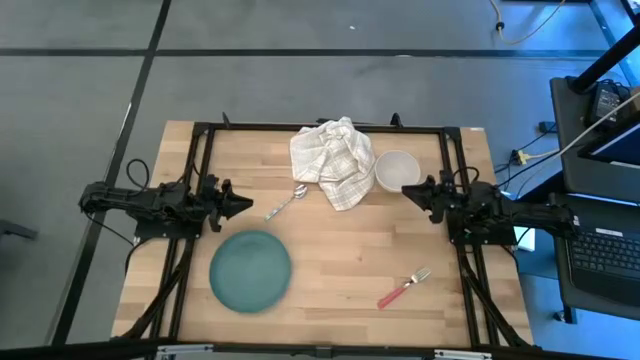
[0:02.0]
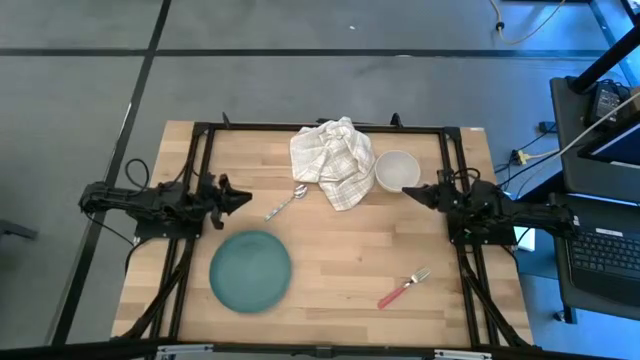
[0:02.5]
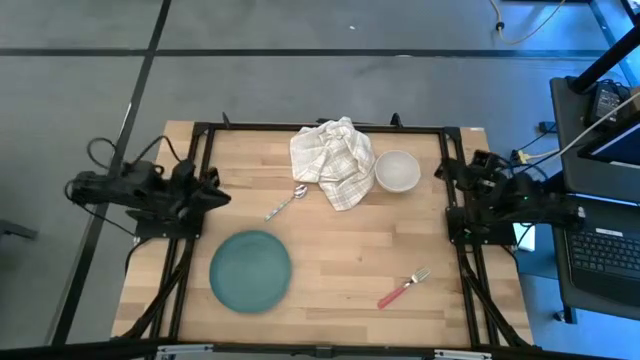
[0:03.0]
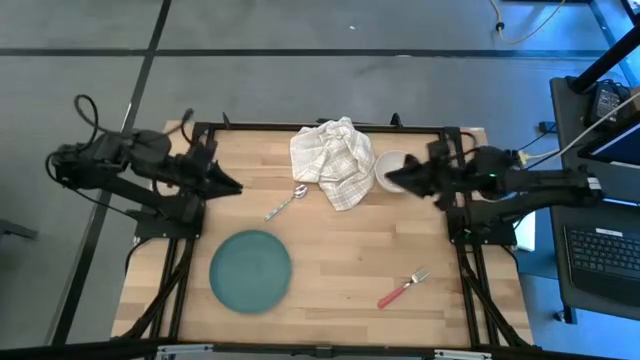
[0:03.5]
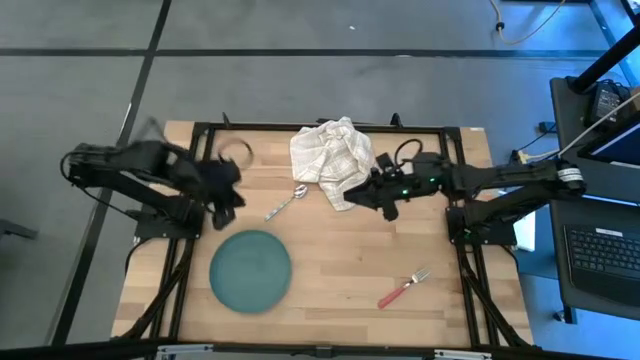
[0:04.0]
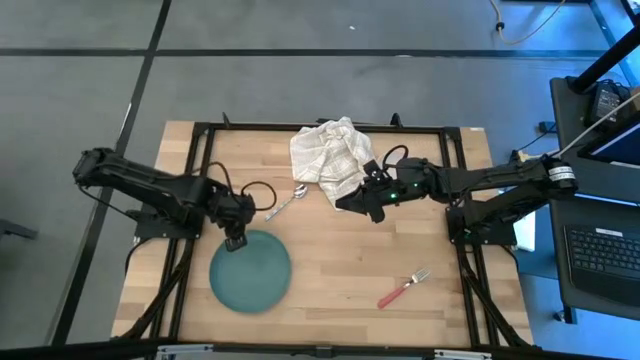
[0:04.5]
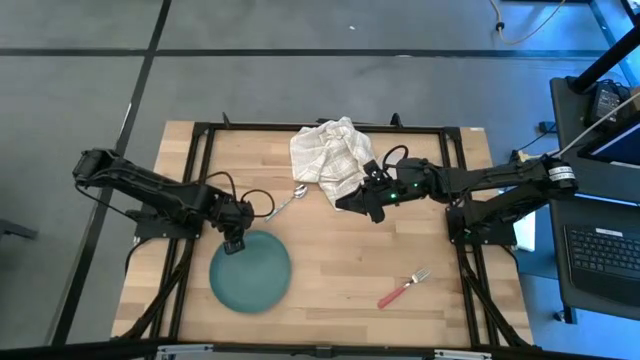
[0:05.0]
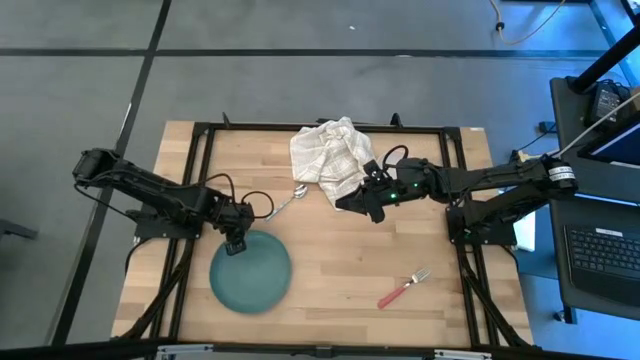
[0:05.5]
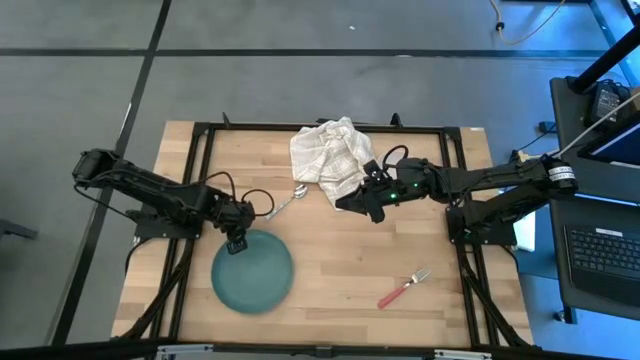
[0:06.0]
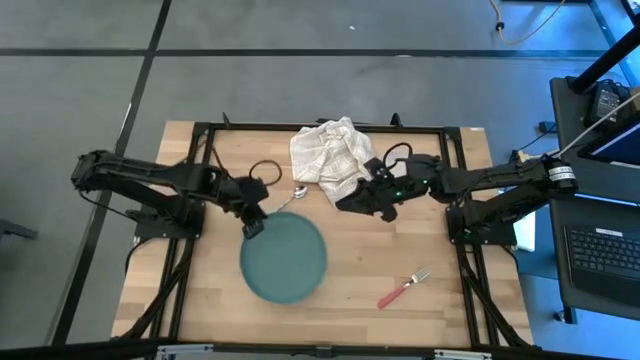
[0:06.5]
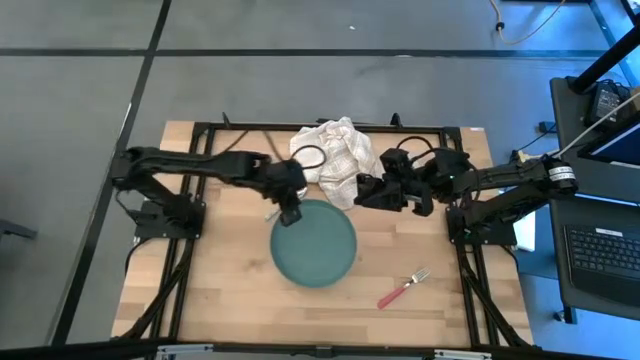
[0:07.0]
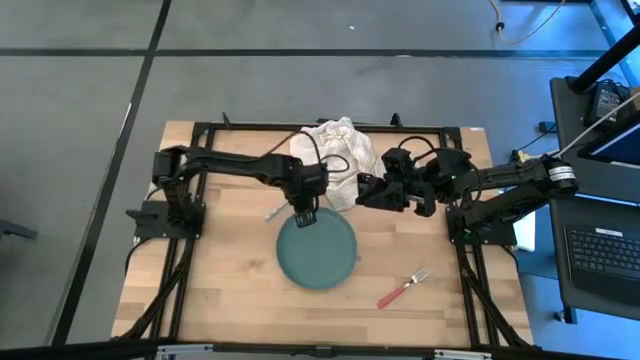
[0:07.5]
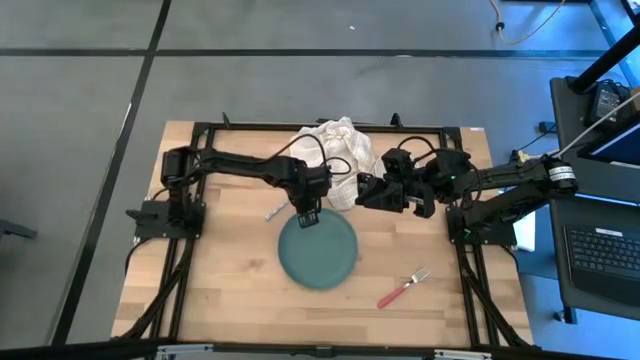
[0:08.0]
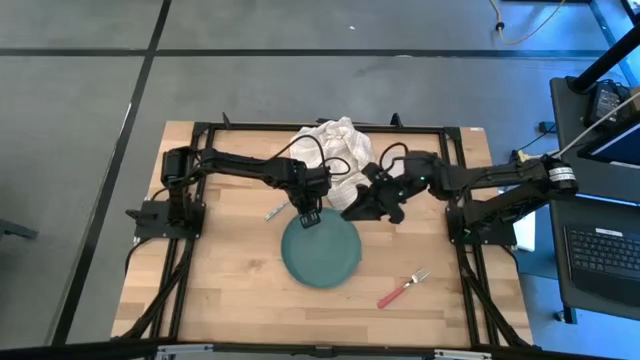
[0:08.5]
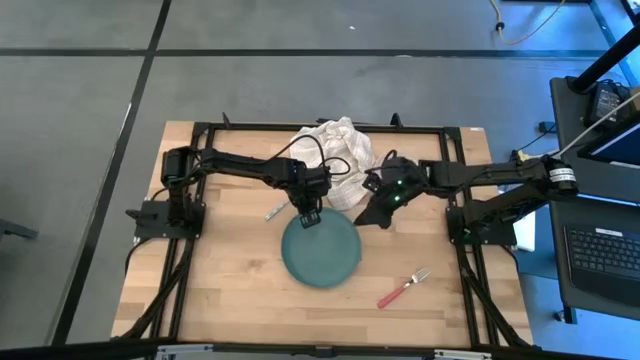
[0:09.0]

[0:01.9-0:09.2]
Task: Set table place
Move the green plate to the center of the table

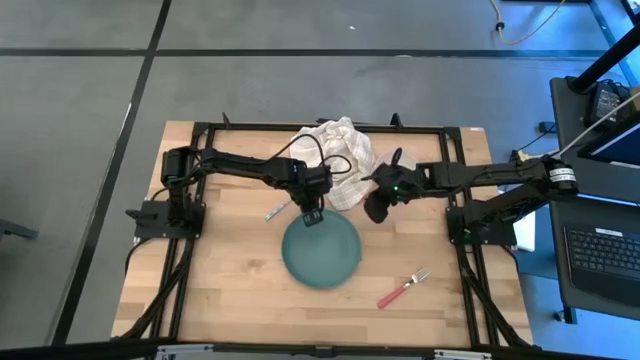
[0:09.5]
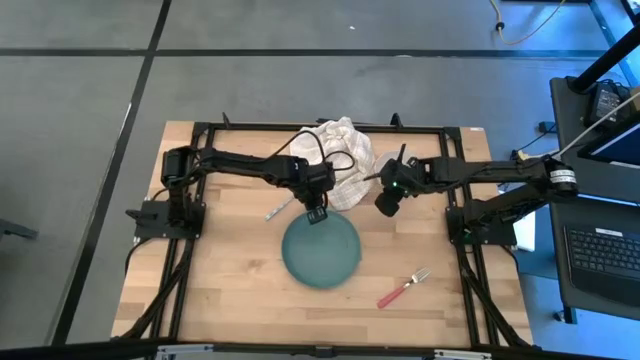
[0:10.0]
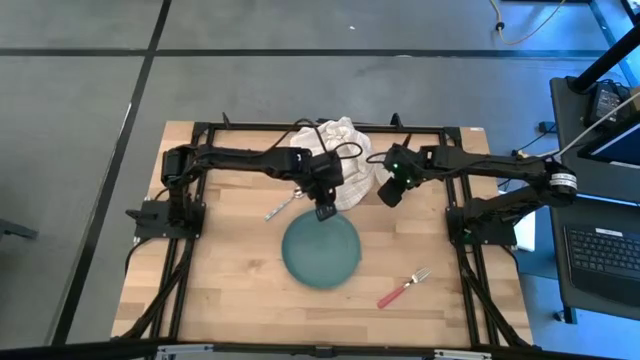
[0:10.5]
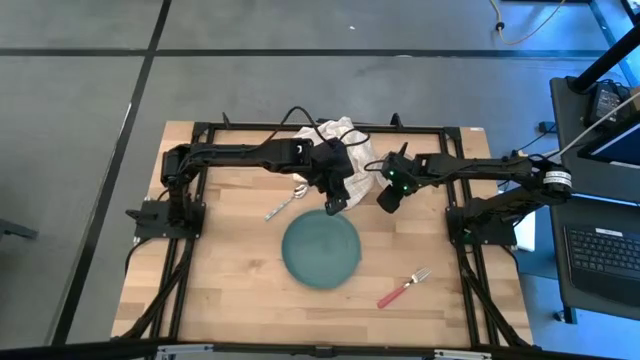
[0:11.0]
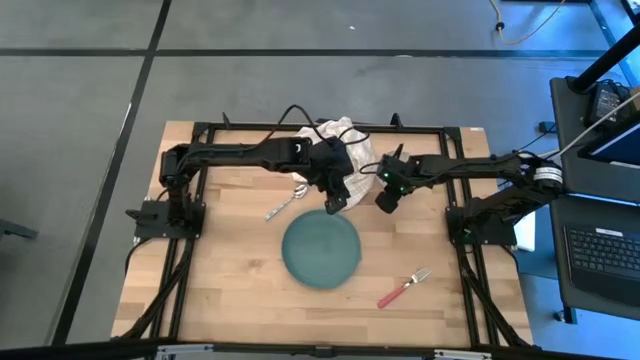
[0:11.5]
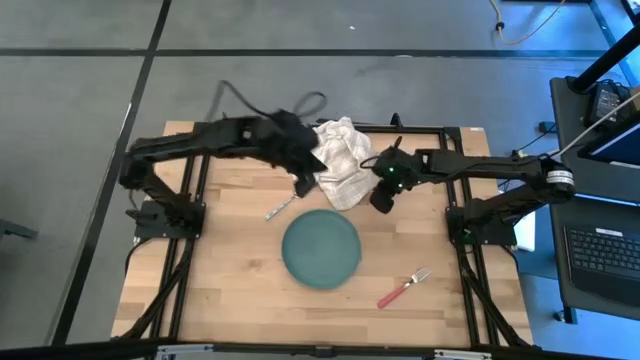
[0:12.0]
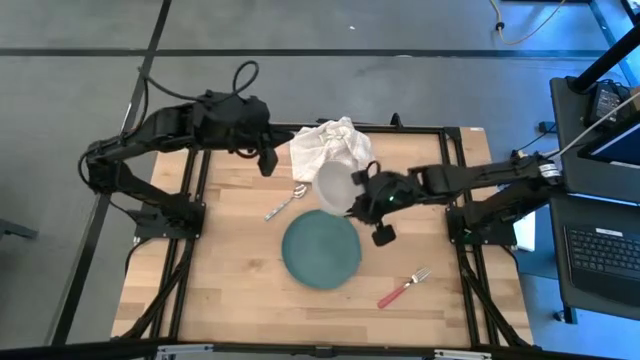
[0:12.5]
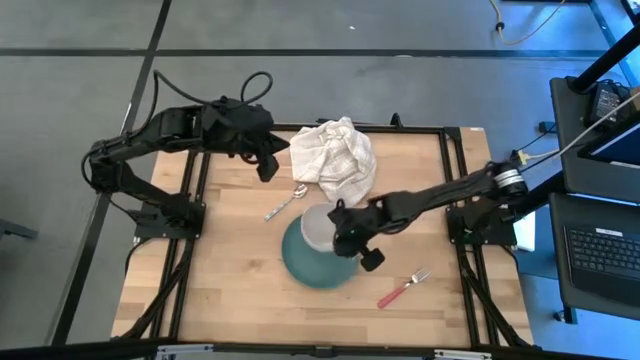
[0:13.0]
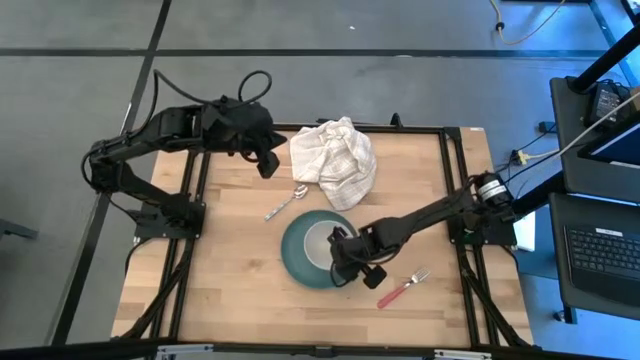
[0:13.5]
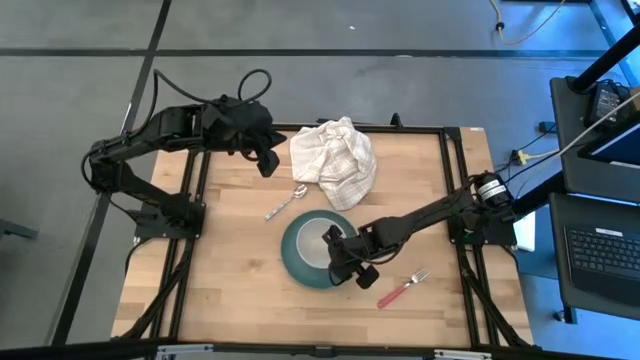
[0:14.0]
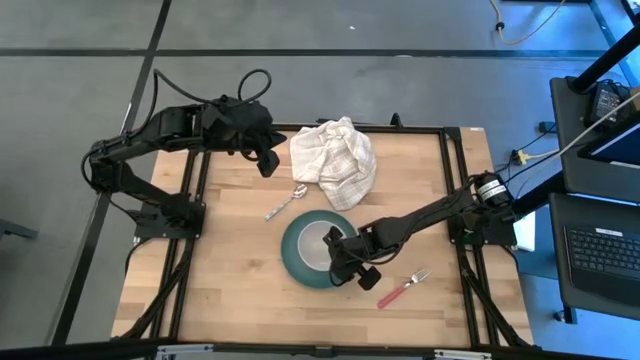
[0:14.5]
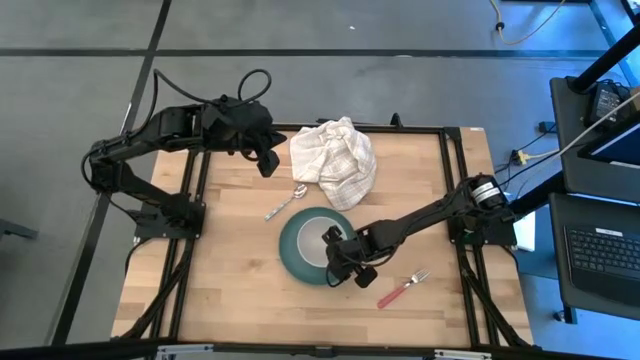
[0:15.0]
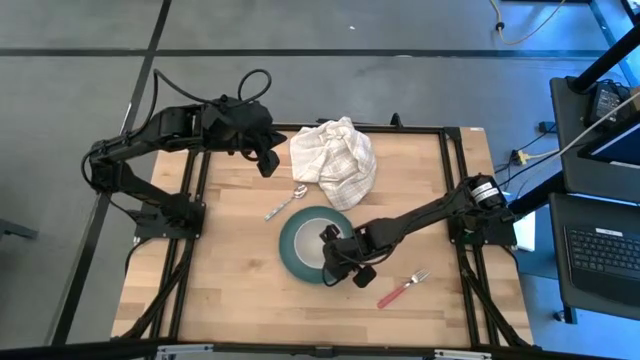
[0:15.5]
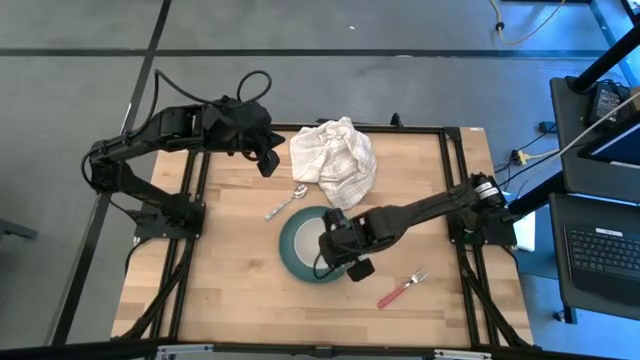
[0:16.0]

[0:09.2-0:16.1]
Put the white bowl onto the green plate

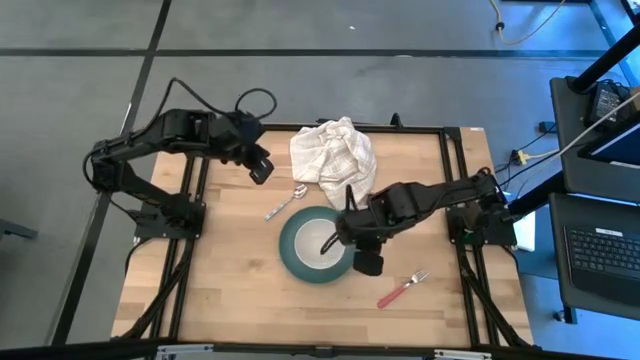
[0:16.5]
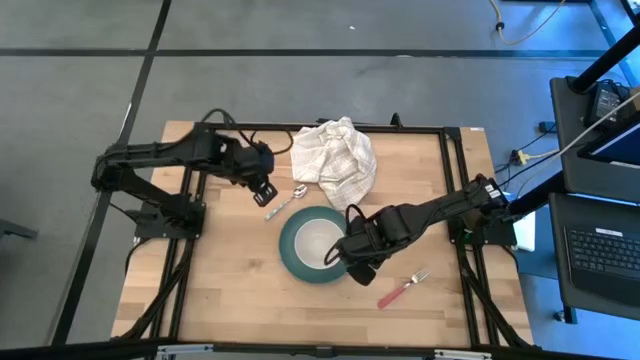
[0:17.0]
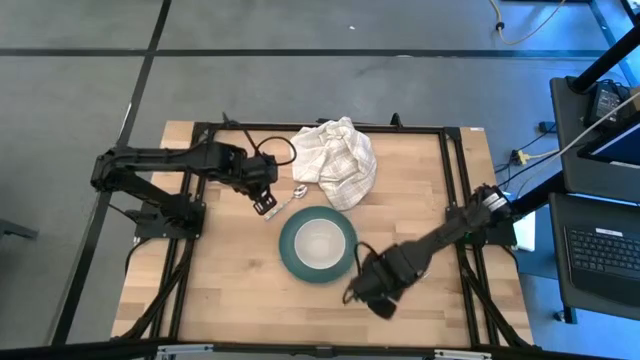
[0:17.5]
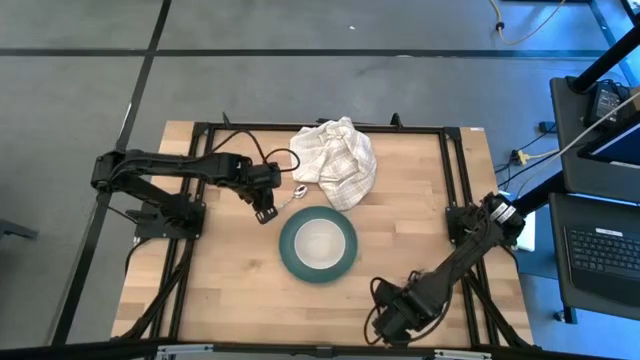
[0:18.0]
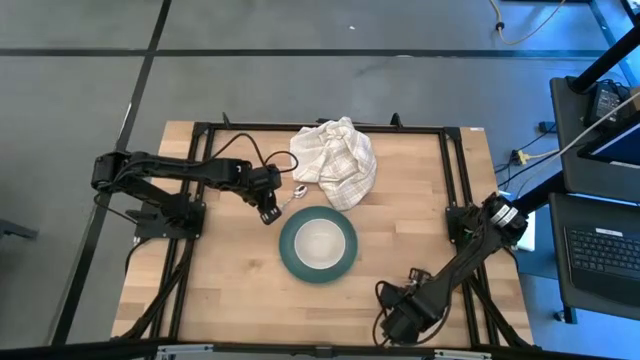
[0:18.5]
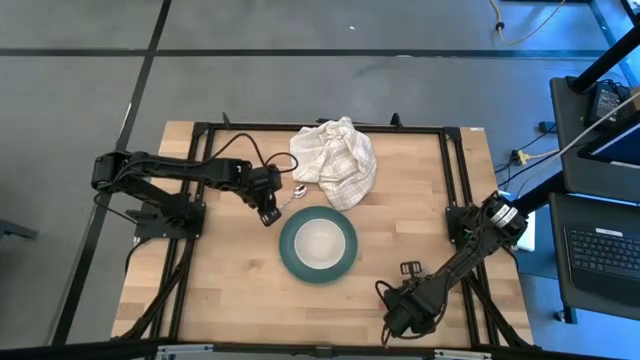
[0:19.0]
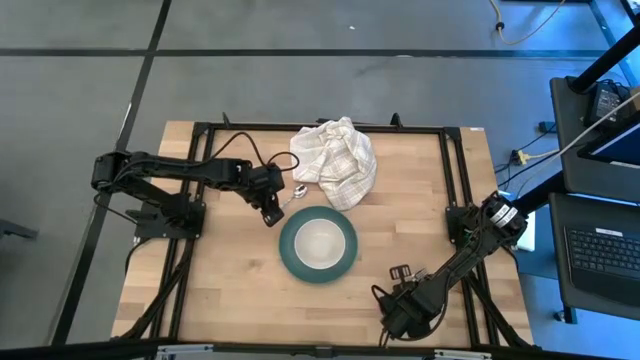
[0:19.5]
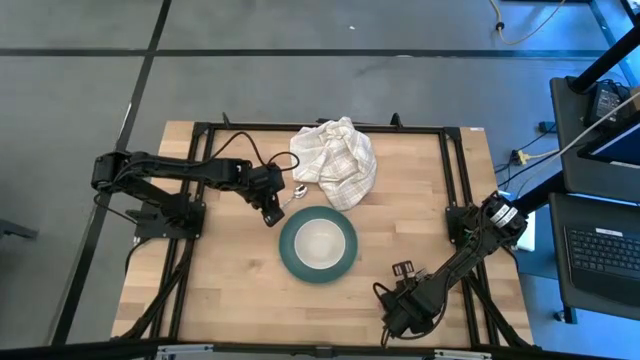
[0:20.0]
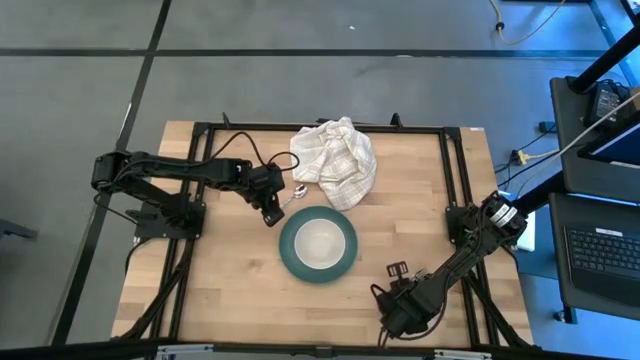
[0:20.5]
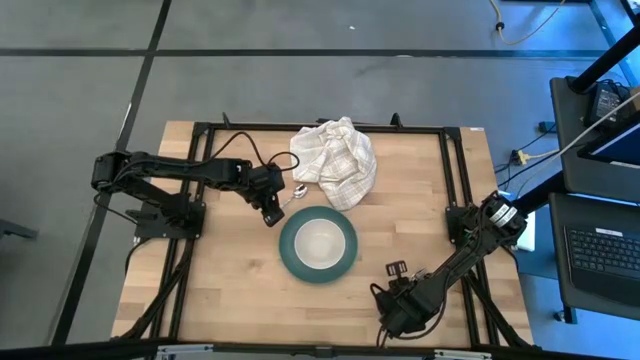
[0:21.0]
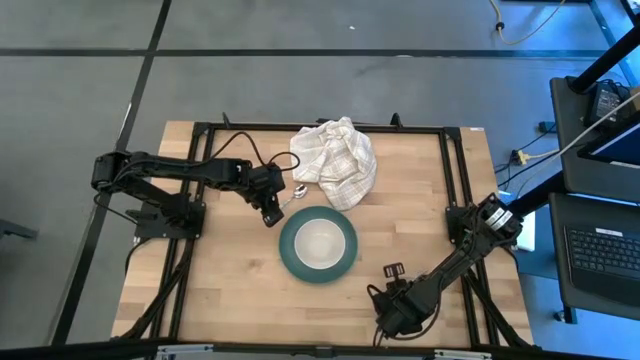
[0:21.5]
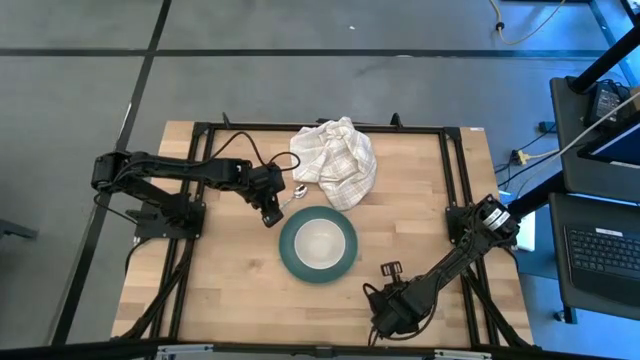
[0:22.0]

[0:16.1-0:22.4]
Move the pink fork to the left of the green plate on the table

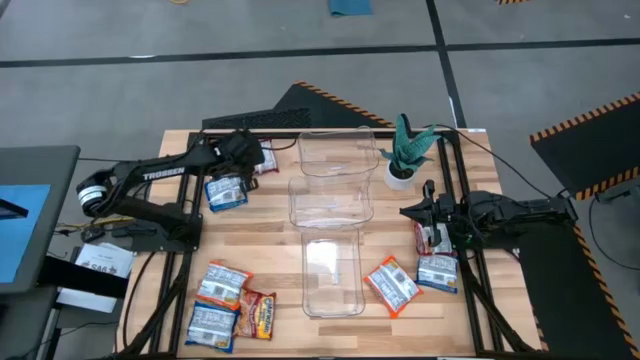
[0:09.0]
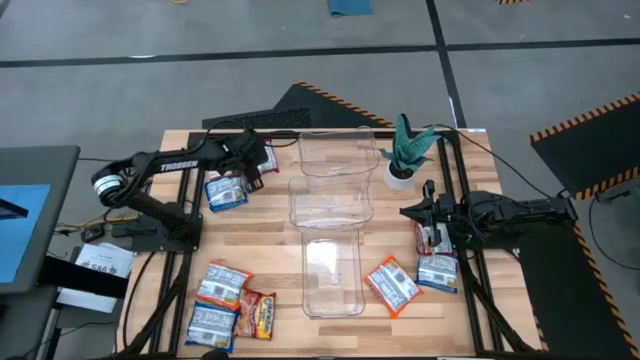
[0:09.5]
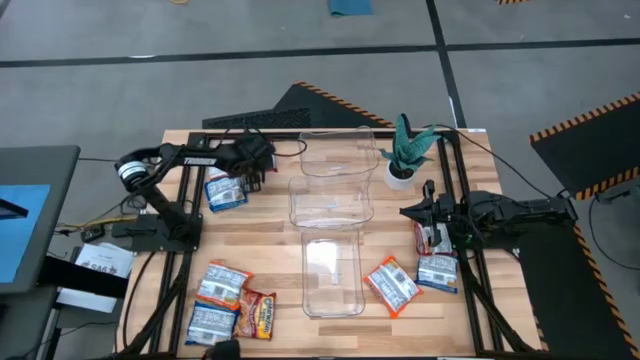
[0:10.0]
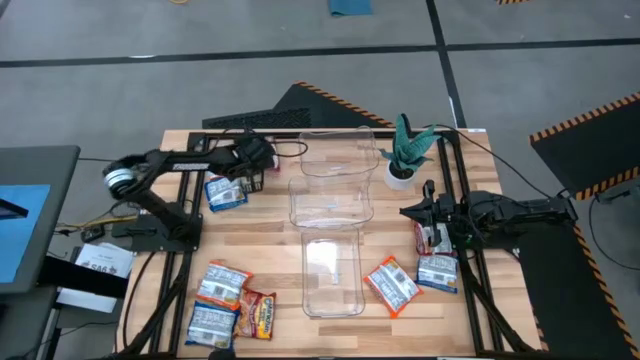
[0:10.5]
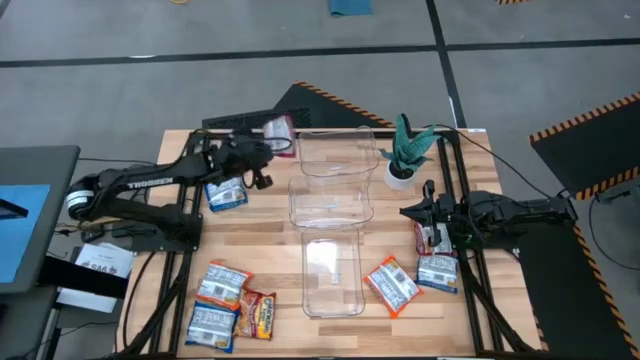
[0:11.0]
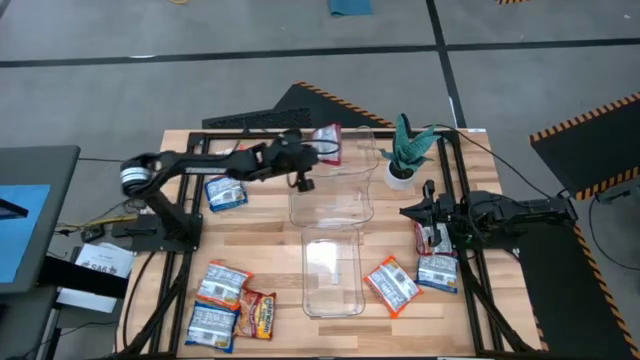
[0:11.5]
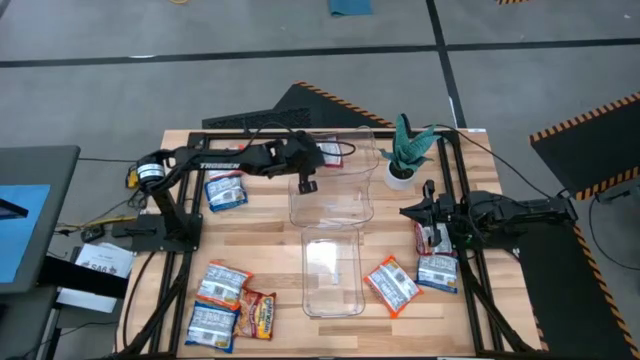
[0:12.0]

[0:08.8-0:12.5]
Task: Sort Maruchan noodles
Put the top red noodle pack into the top transparent bin
